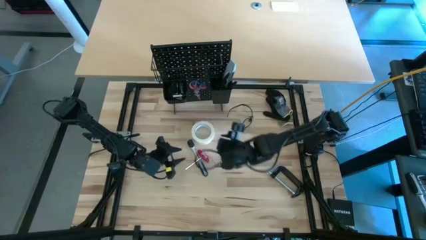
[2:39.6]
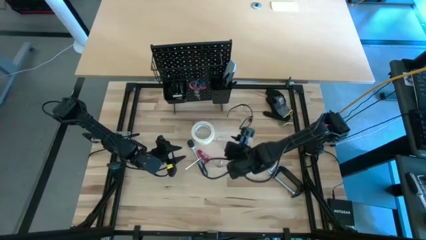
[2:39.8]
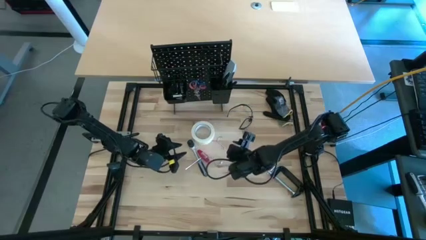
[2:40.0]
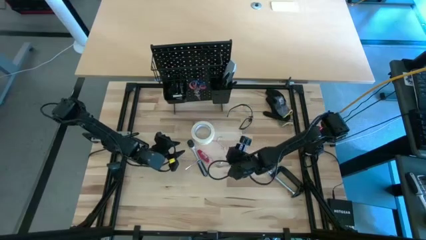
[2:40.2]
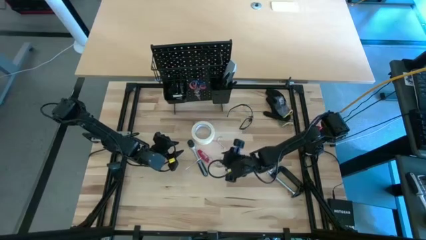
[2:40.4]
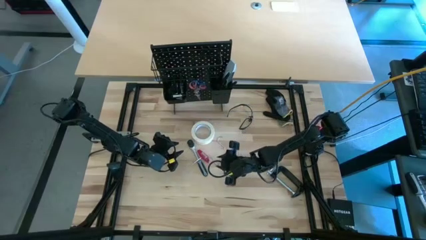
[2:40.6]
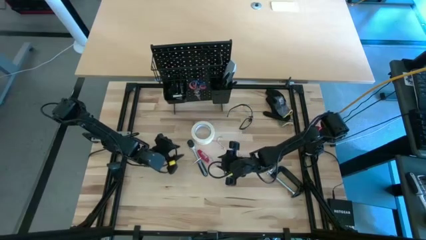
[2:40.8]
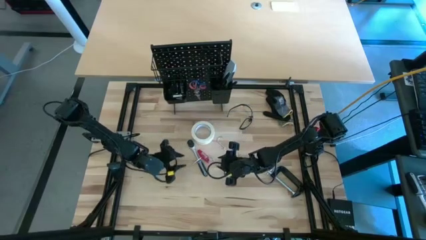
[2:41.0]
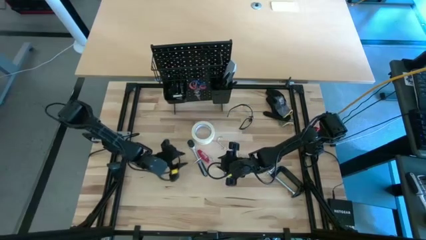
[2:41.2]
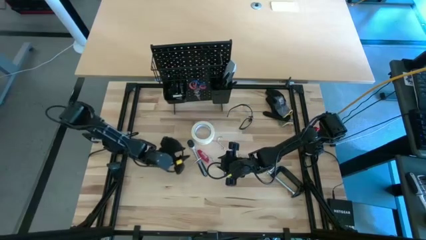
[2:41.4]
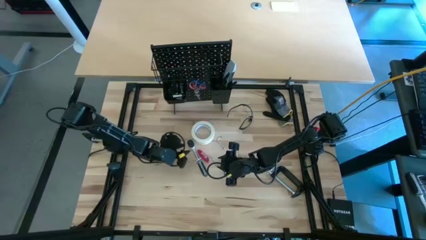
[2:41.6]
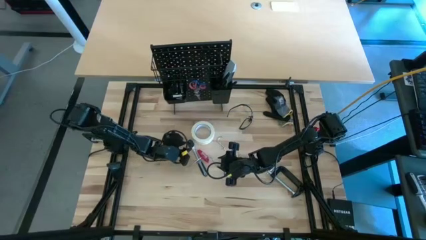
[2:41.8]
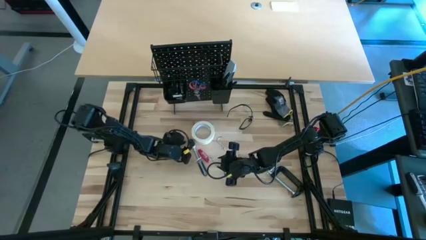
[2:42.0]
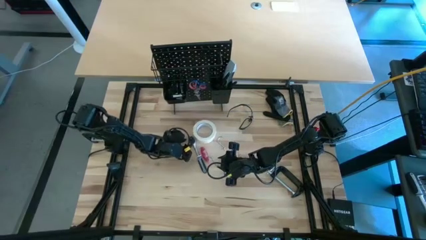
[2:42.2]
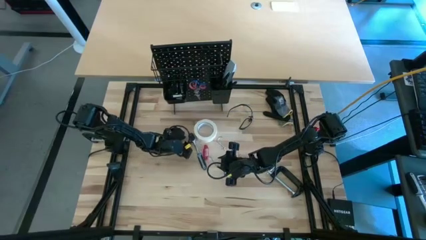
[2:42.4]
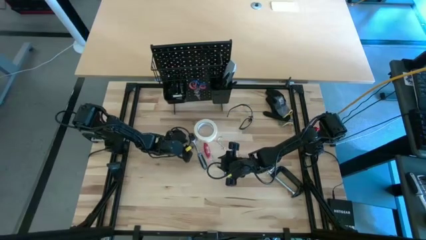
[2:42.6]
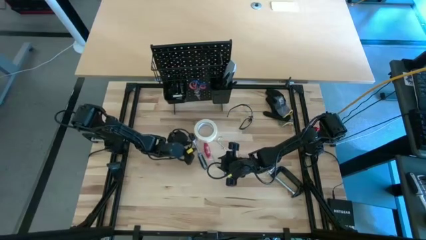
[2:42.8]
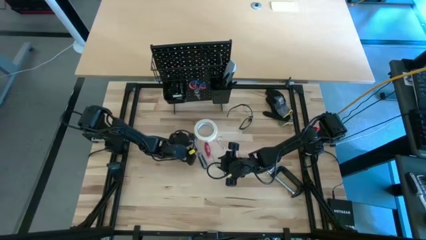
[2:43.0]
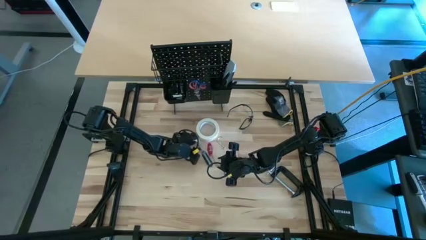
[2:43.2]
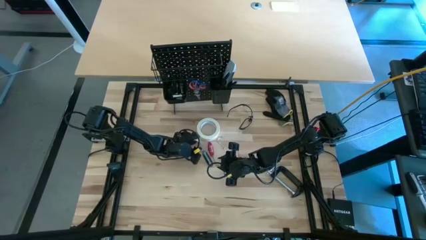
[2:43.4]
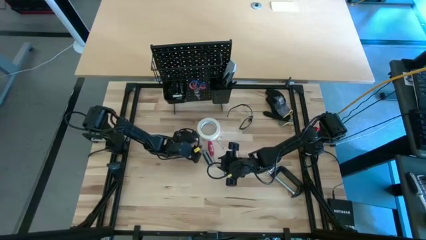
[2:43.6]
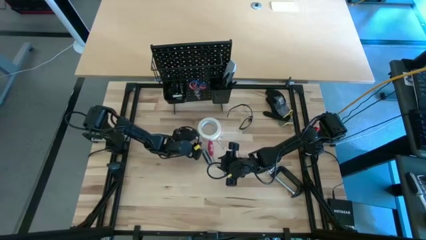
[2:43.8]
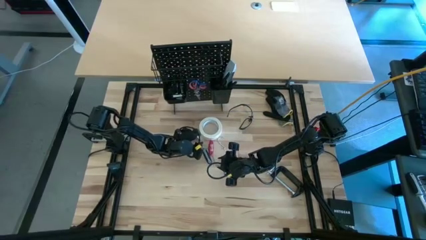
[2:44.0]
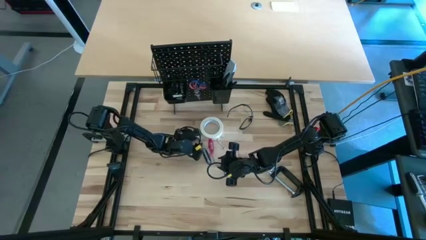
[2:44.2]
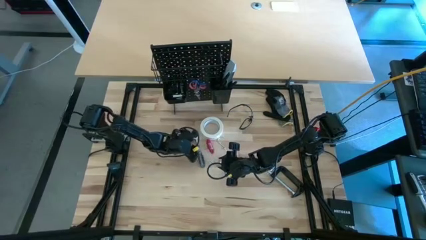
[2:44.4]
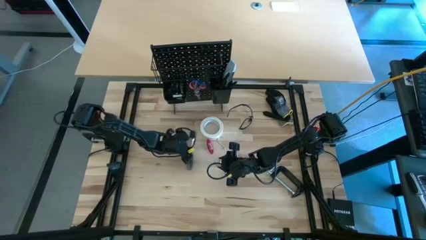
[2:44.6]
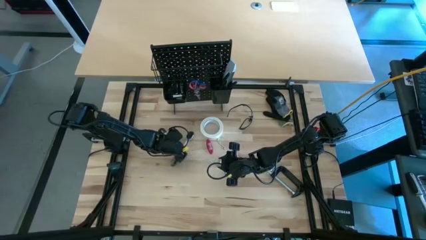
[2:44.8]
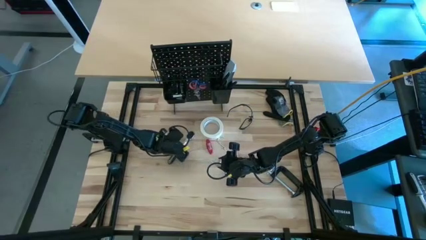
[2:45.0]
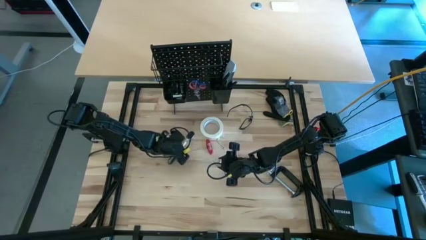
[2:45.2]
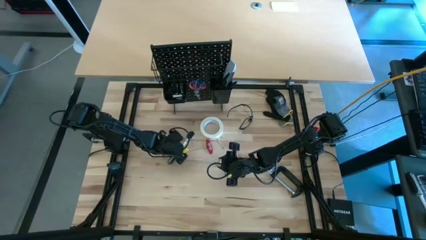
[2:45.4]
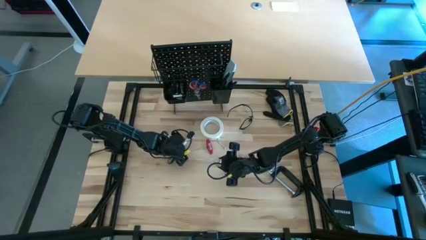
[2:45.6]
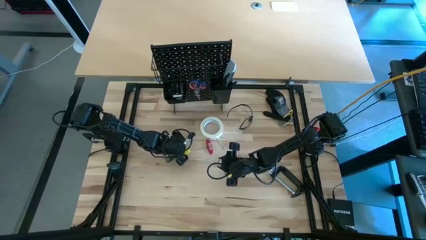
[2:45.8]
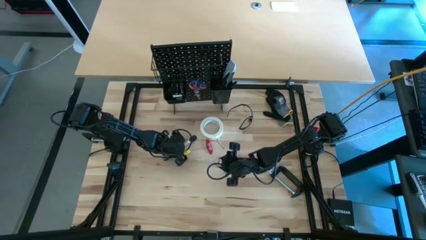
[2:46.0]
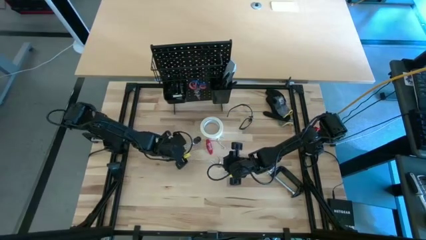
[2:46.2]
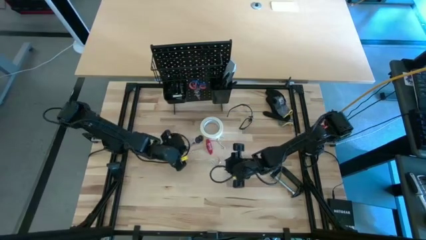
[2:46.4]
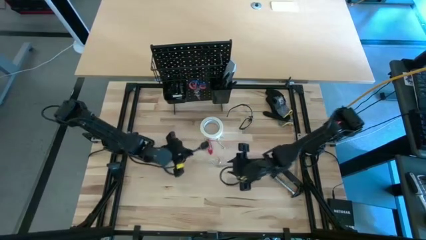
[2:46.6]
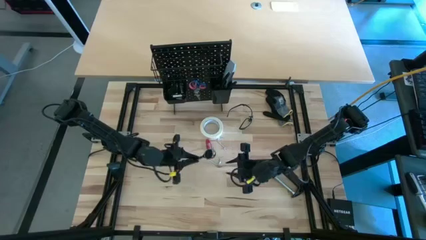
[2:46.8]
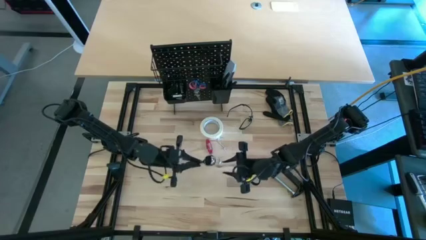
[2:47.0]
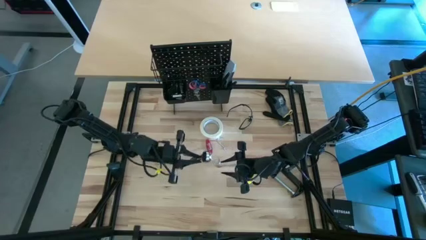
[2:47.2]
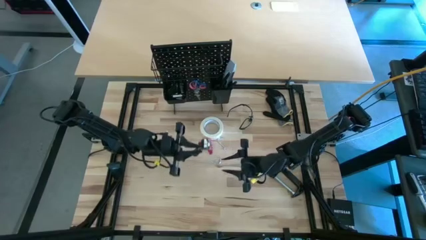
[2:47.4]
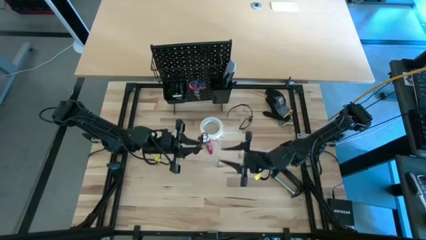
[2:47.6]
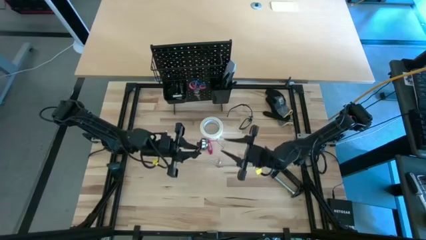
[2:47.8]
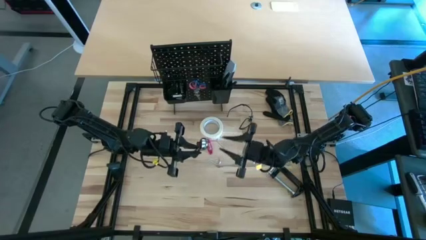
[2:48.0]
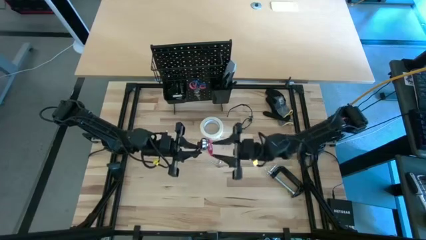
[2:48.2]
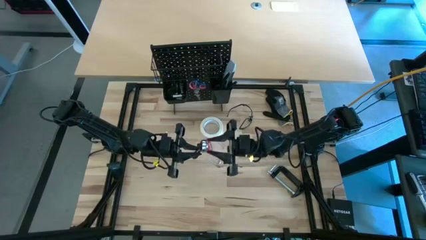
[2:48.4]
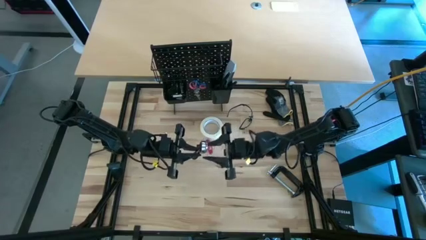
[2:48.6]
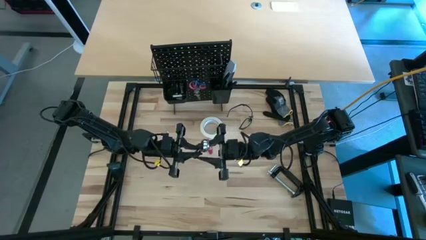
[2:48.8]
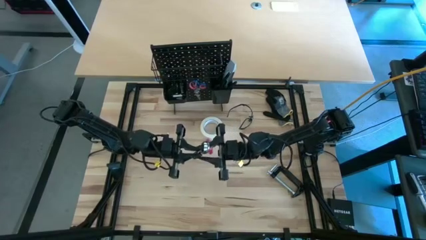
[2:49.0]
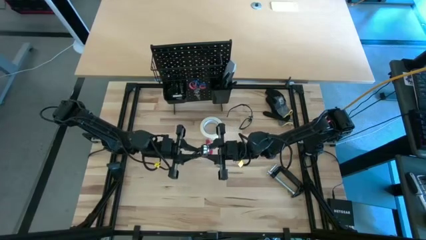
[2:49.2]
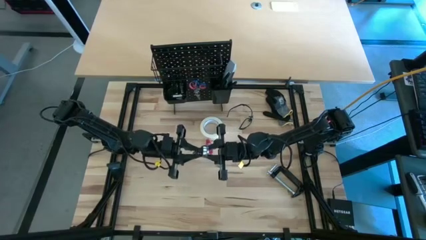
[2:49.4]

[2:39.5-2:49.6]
Task: Hang tools onto peg board
Put the silver ratchet wrench into the left black bin on the peg board

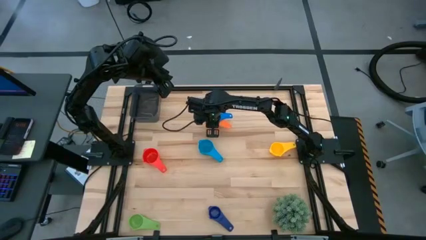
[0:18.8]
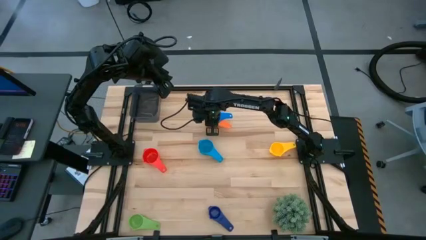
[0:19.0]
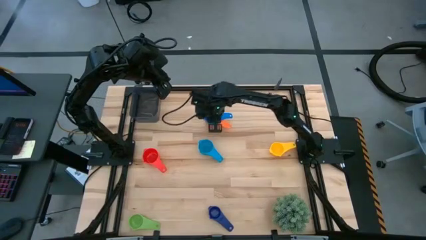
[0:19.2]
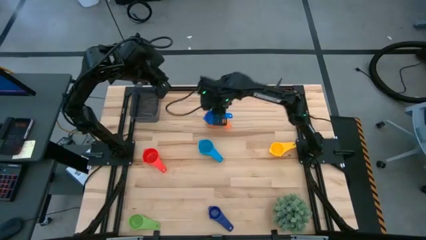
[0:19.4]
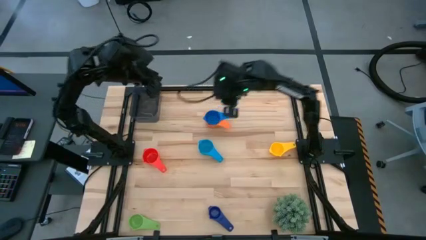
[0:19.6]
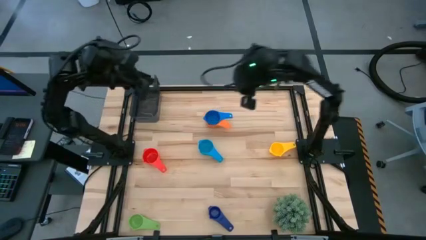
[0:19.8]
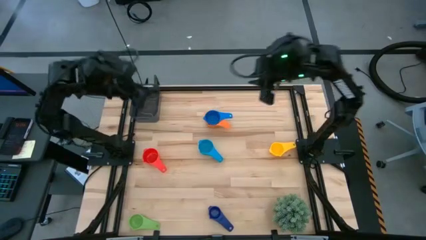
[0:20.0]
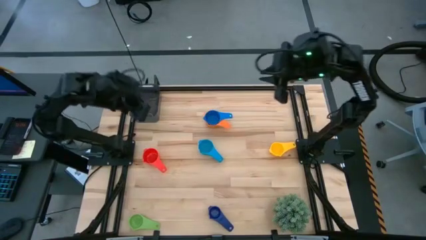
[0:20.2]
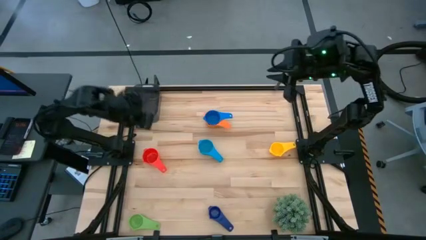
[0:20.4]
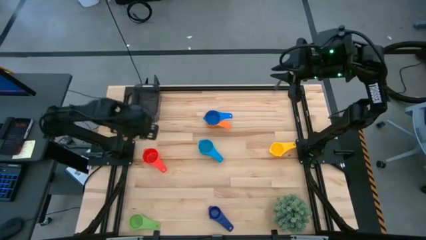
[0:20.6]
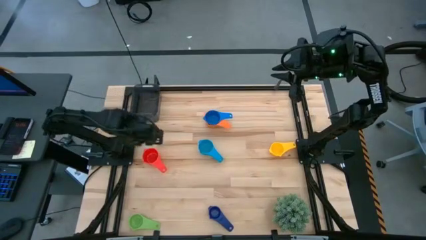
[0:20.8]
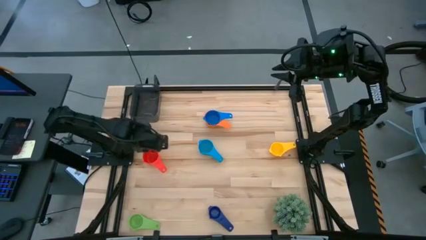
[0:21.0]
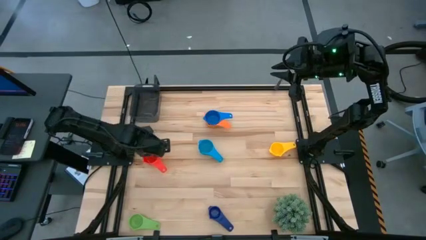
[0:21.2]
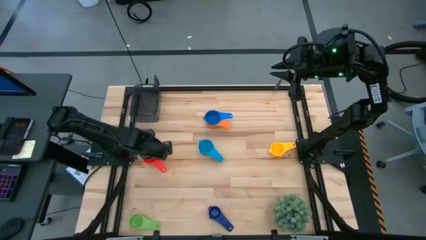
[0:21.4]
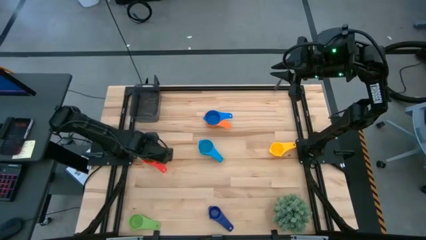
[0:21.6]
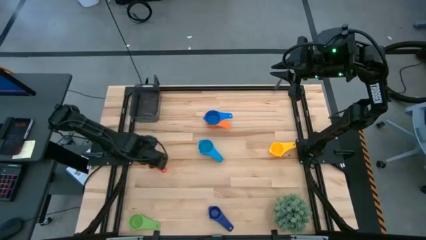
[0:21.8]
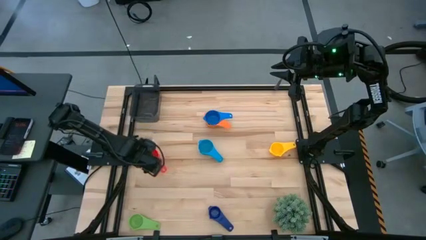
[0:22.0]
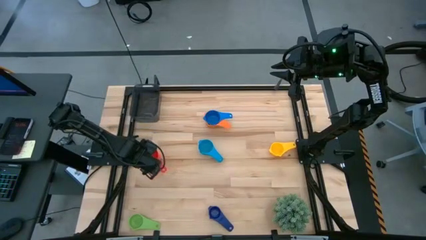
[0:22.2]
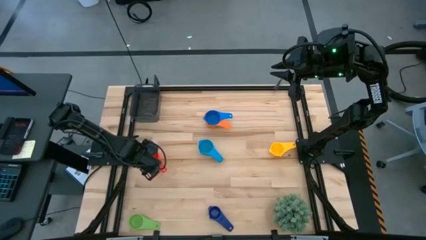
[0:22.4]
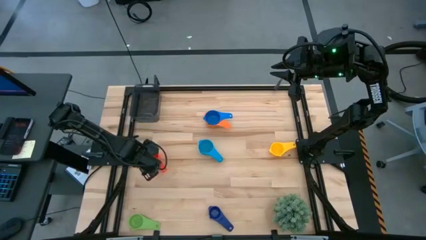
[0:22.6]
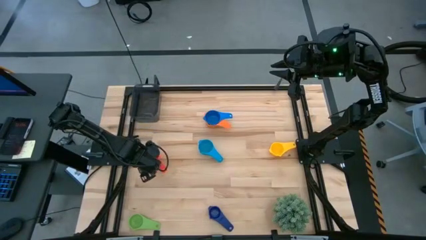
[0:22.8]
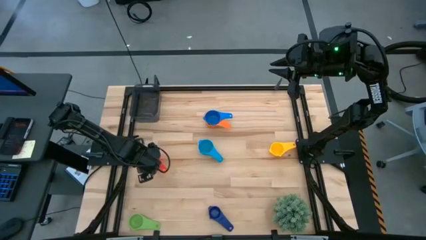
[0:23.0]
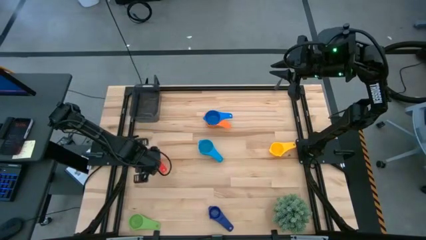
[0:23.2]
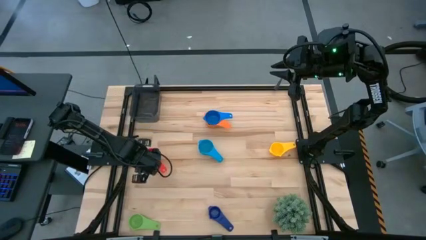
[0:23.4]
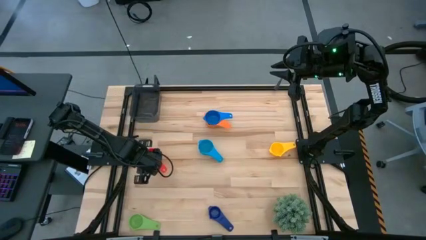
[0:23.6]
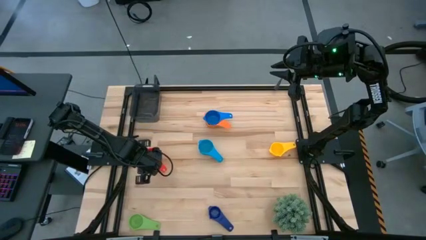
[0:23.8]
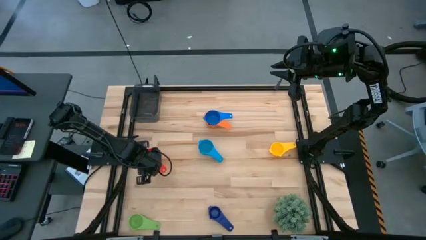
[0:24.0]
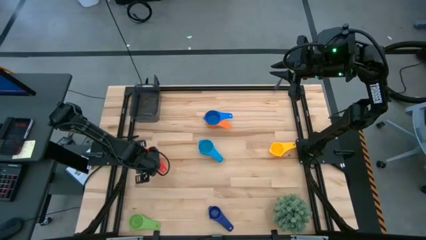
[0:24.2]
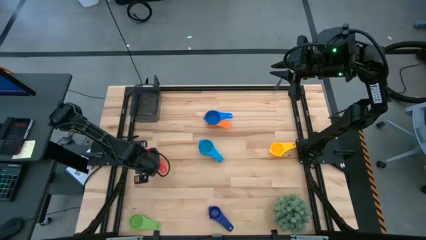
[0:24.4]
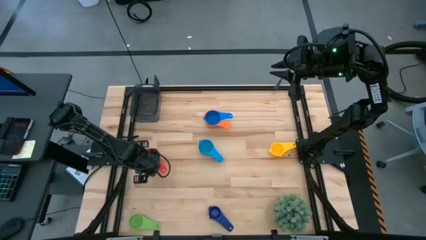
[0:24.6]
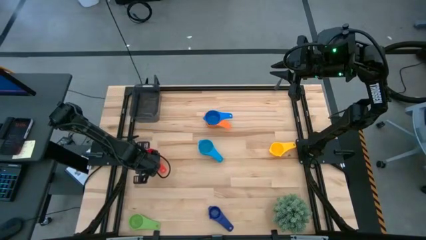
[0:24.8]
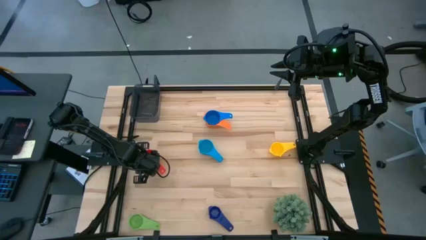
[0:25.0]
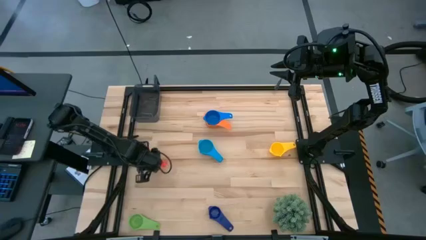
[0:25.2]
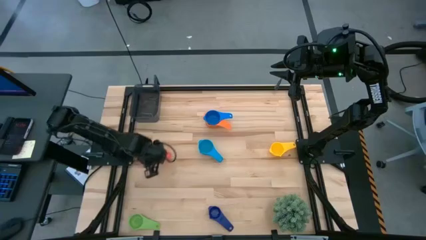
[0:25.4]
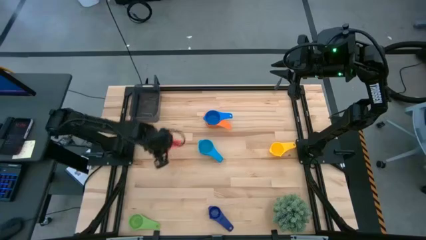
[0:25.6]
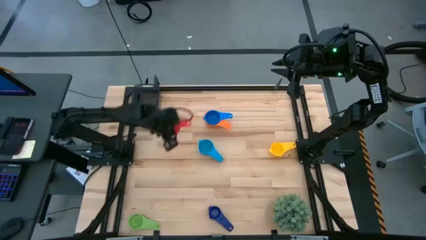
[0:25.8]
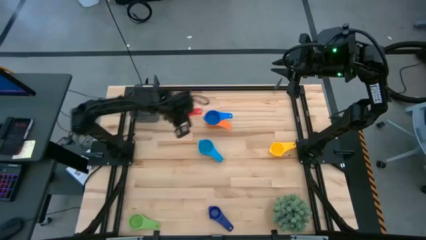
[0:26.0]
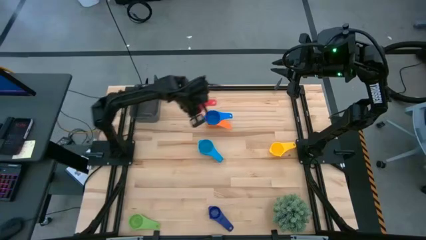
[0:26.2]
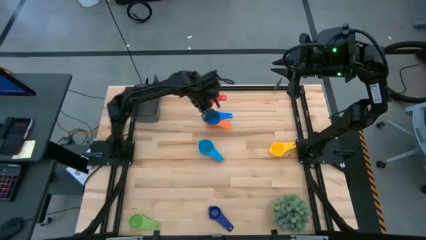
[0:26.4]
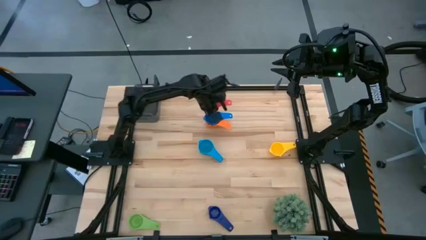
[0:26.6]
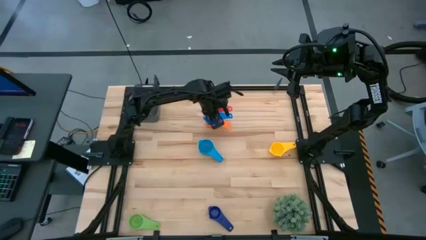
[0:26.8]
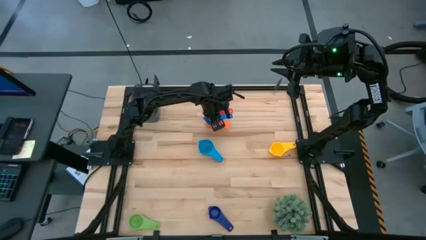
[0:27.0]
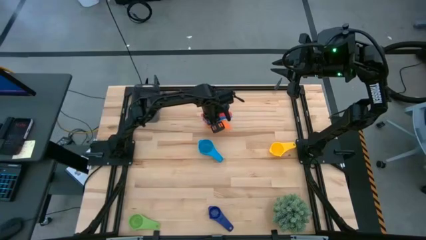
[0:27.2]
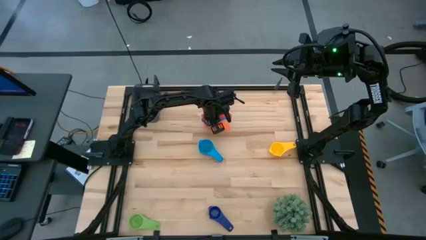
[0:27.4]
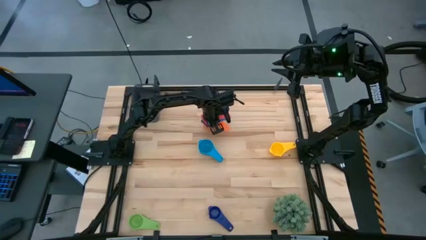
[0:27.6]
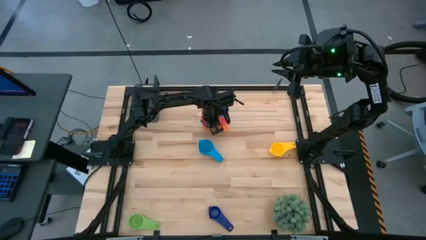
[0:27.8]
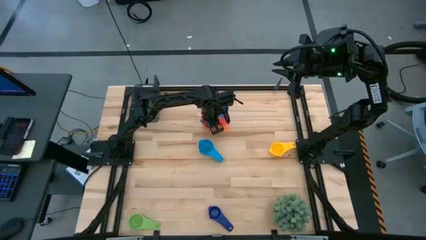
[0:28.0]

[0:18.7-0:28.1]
Task: Nest measuring cups in basket
Stack the red measuring cup on top of the blue measuring cup
